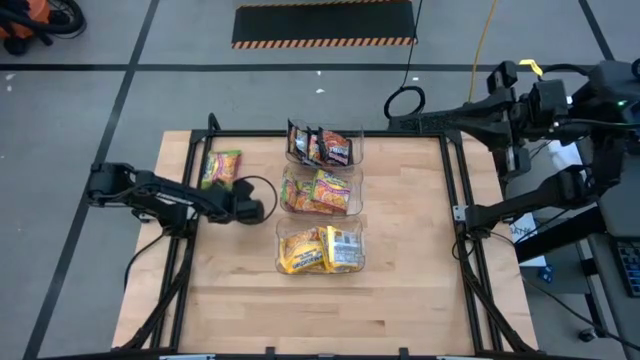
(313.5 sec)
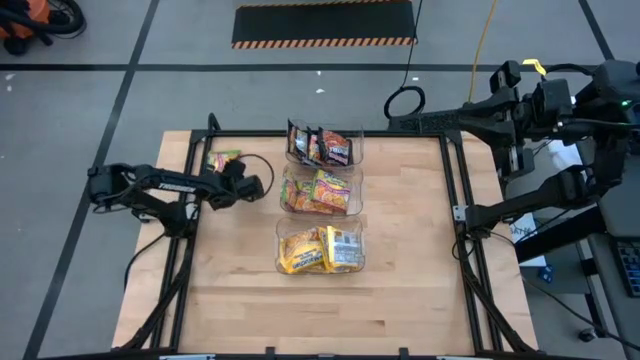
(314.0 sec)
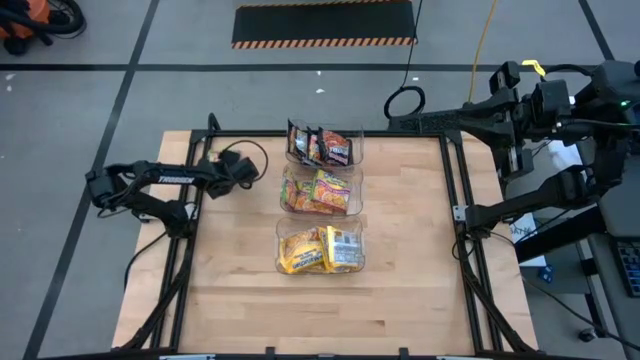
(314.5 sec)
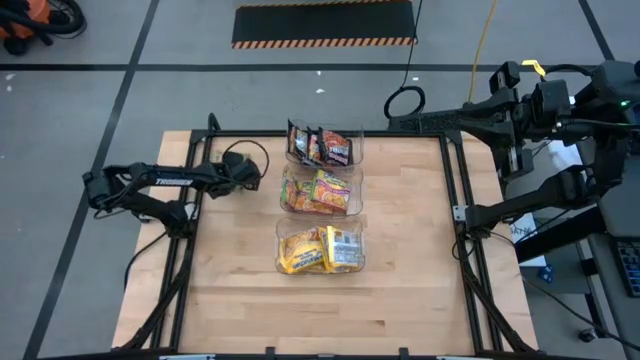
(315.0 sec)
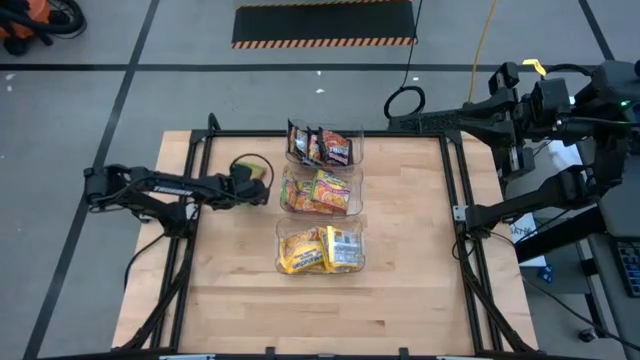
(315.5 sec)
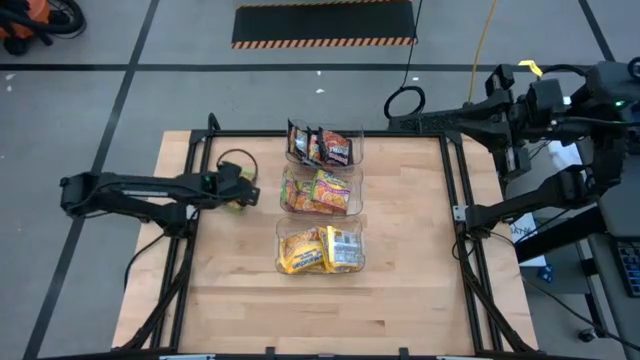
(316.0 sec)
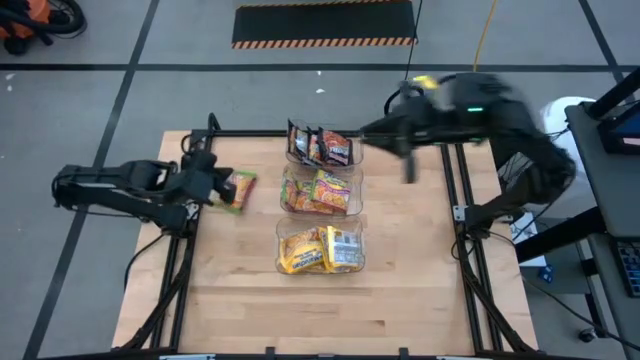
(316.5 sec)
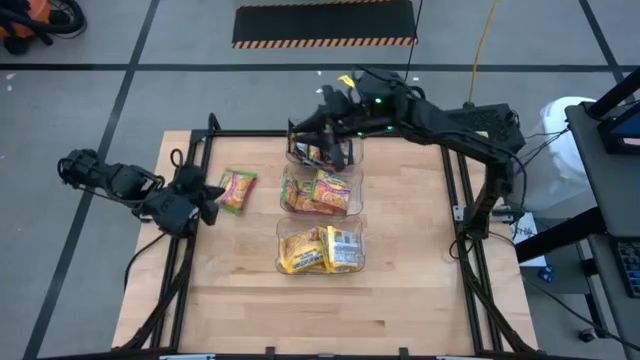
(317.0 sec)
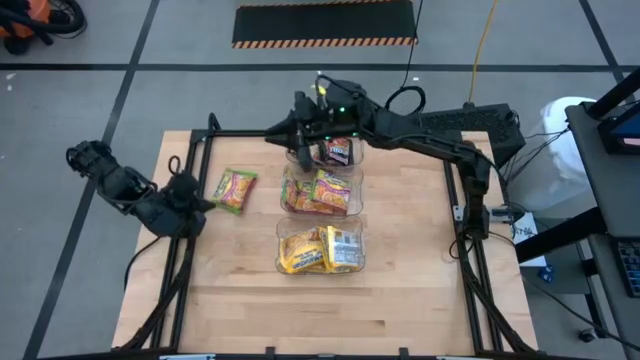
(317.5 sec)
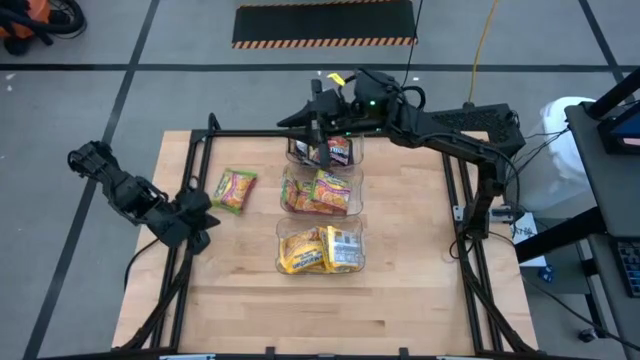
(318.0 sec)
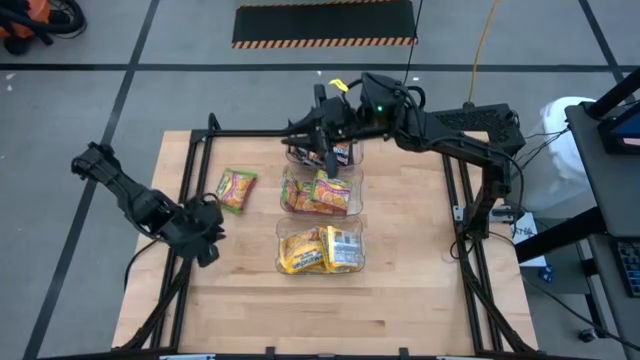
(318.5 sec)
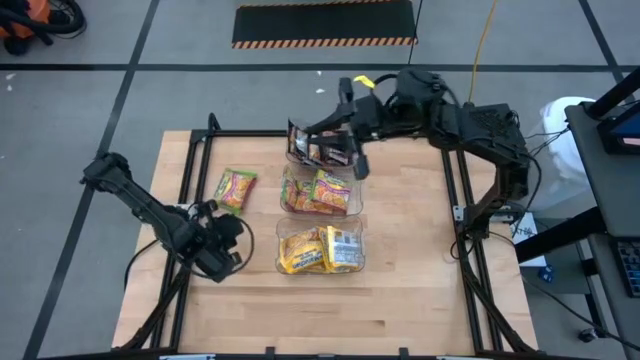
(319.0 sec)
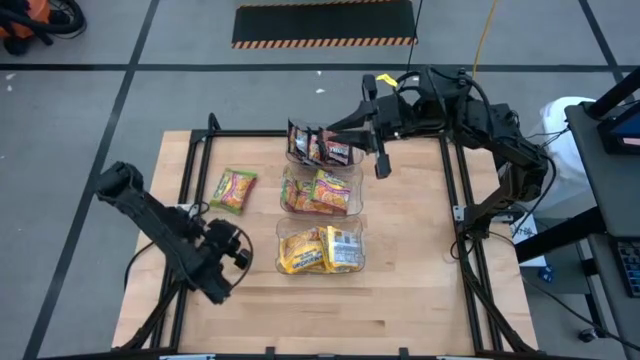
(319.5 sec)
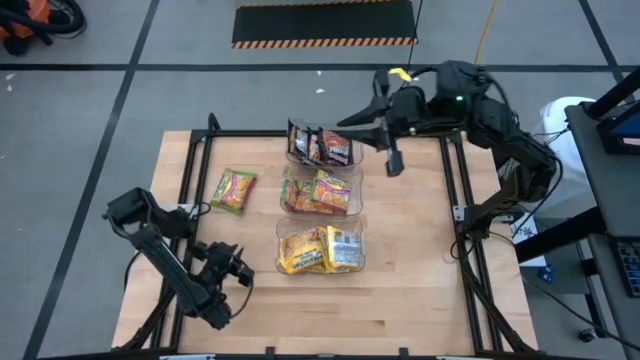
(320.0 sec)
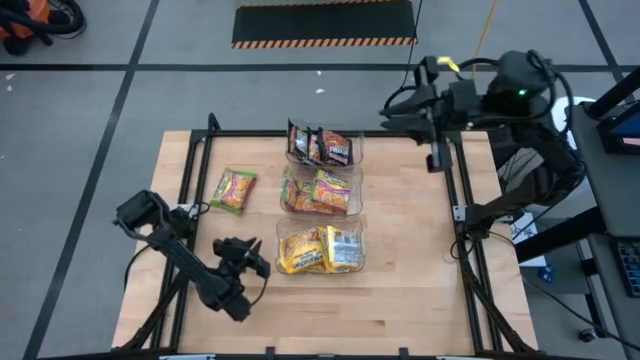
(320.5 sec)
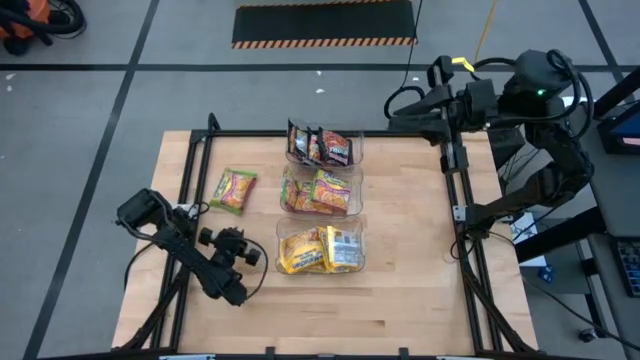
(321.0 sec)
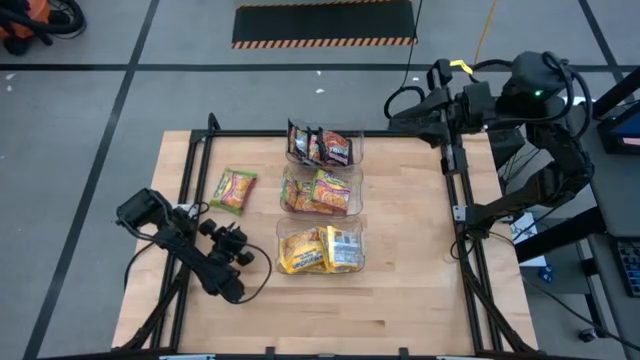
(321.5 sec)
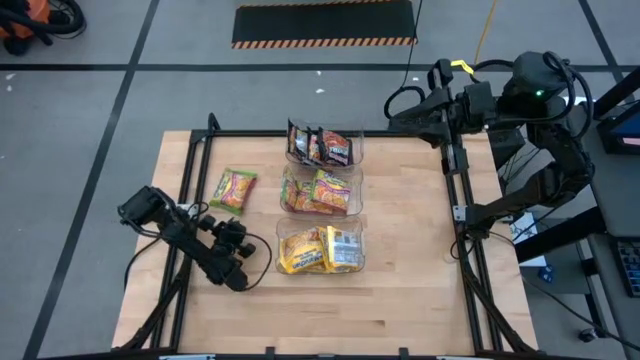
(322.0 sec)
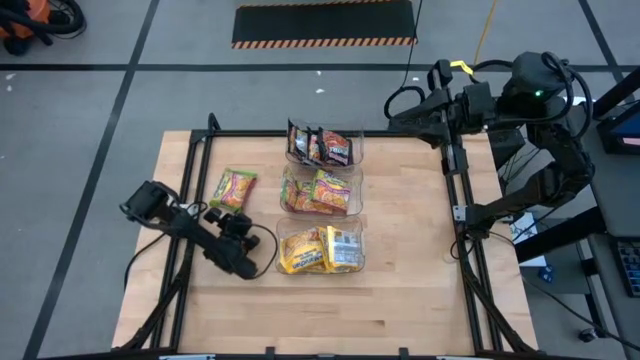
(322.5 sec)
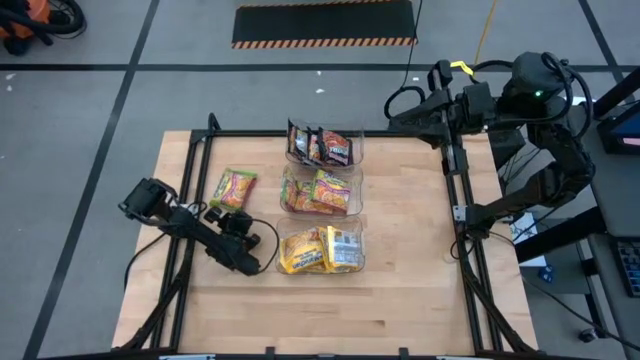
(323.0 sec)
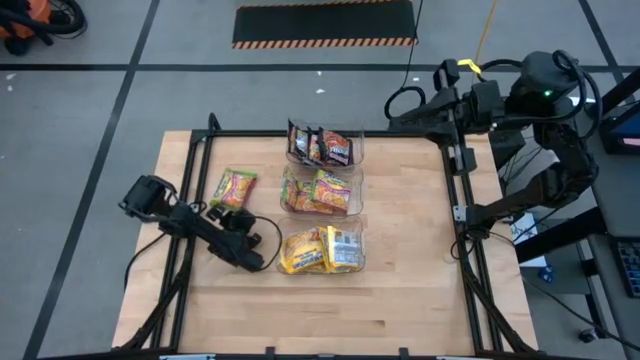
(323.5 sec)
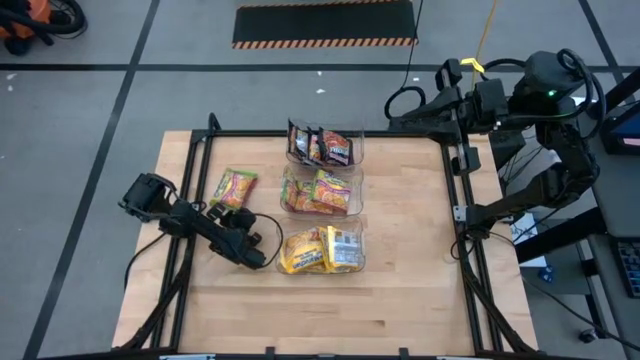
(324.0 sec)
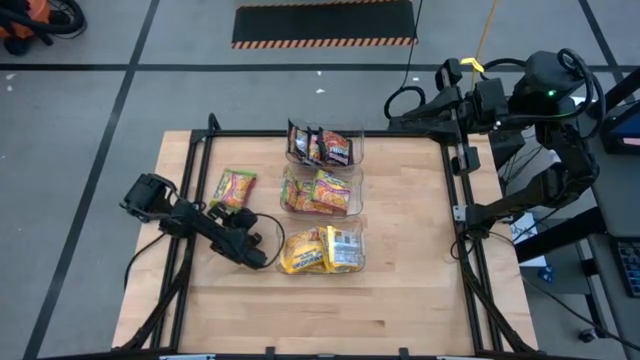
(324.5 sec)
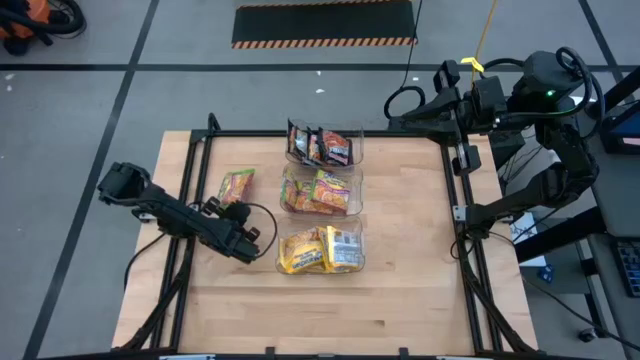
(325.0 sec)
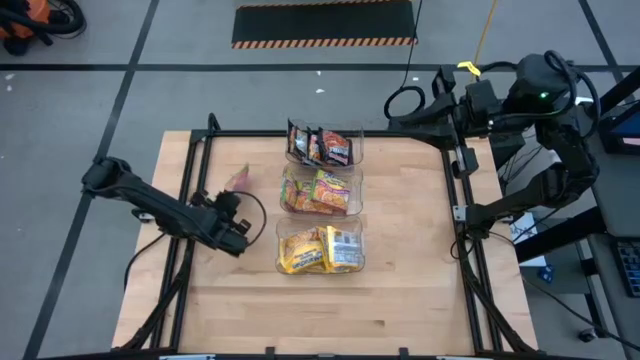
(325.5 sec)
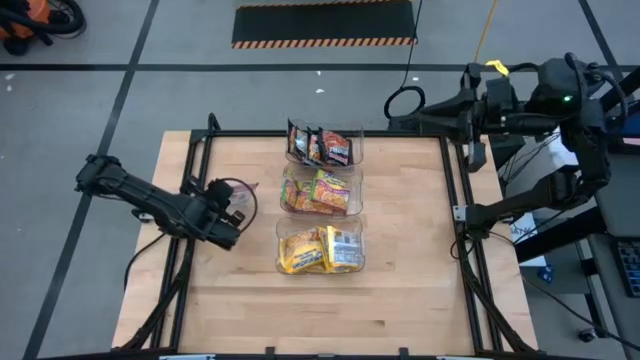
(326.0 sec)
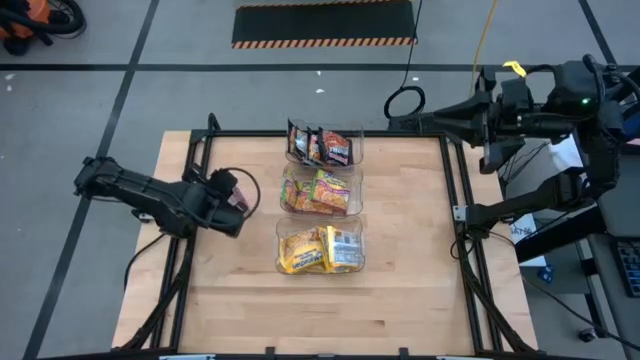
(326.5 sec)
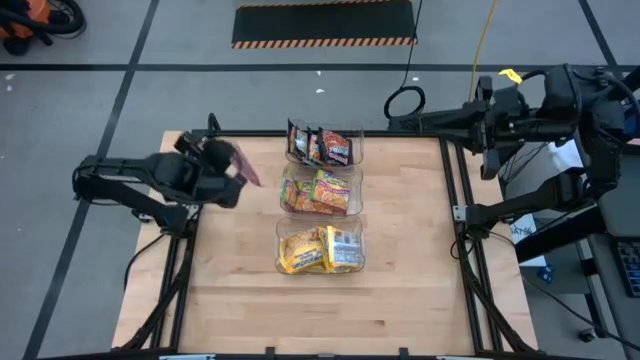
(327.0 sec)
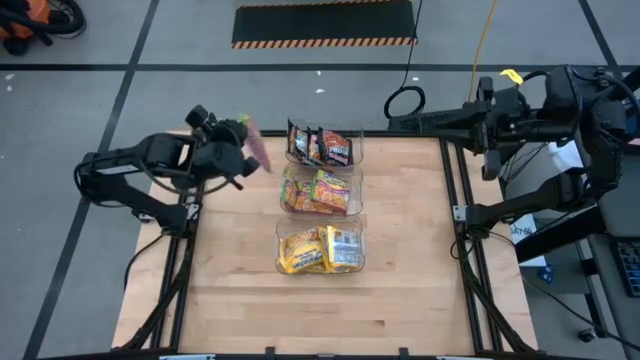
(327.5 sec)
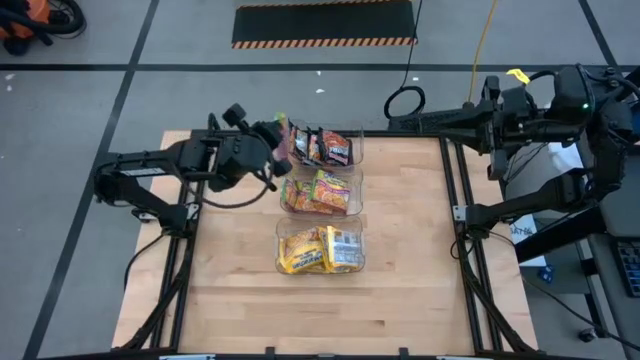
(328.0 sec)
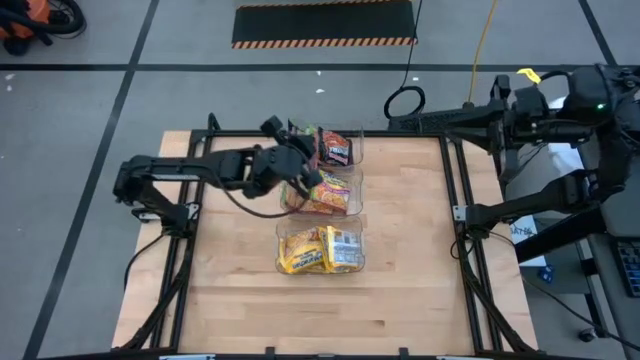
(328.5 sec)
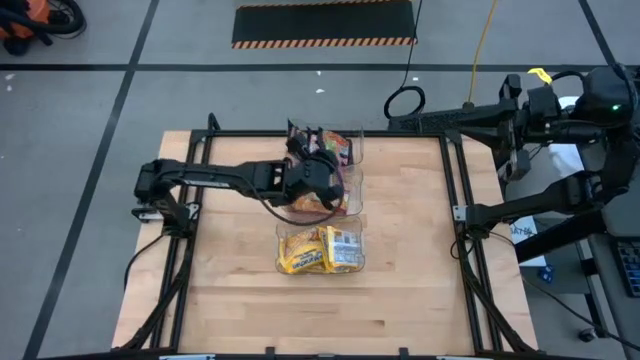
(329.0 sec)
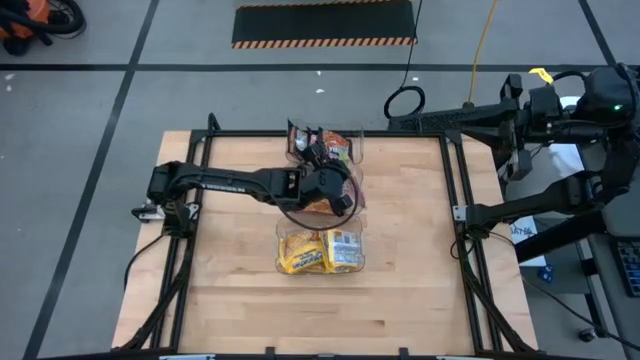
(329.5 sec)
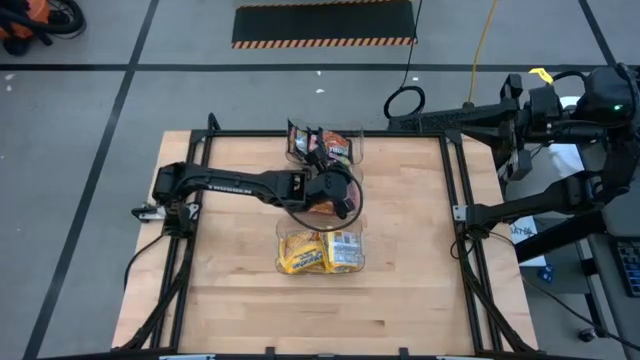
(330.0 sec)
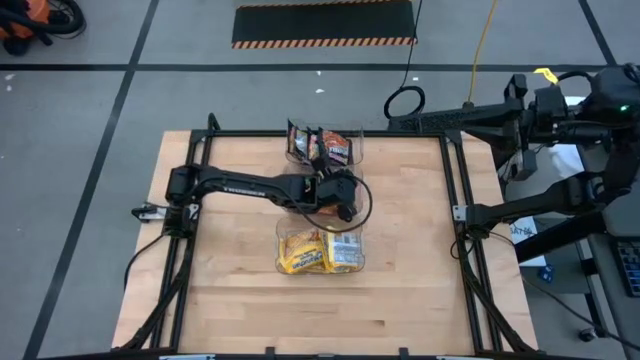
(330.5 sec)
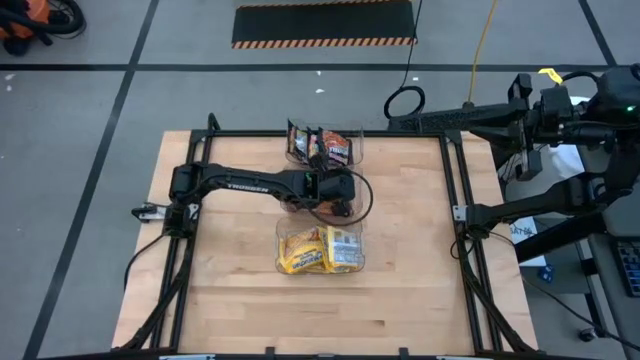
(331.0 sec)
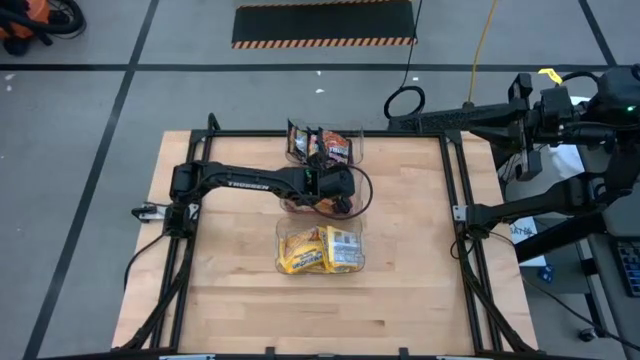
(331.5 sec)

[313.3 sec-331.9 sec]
Task: Sort Maruchan noodles
Put the green noodle pack into the center transparent bin

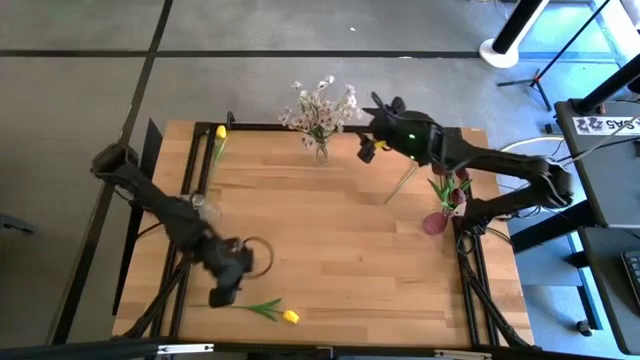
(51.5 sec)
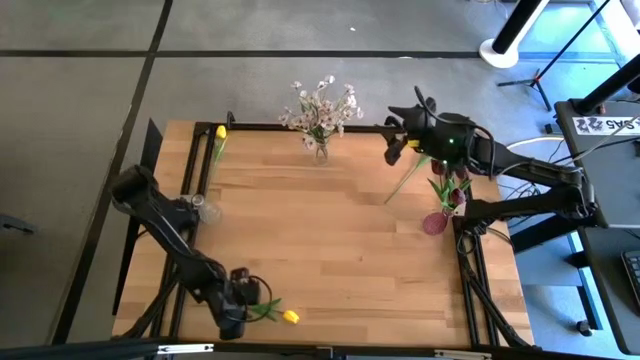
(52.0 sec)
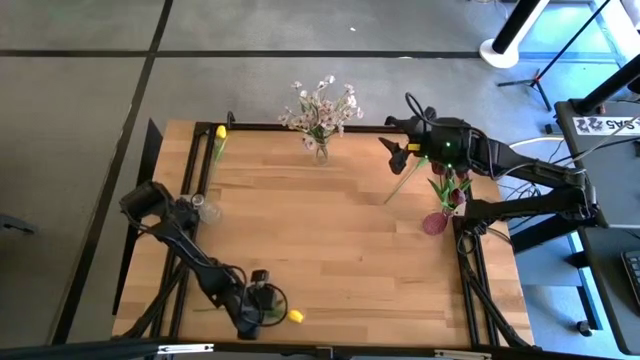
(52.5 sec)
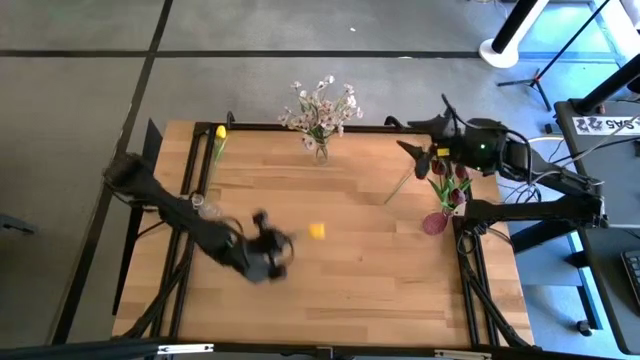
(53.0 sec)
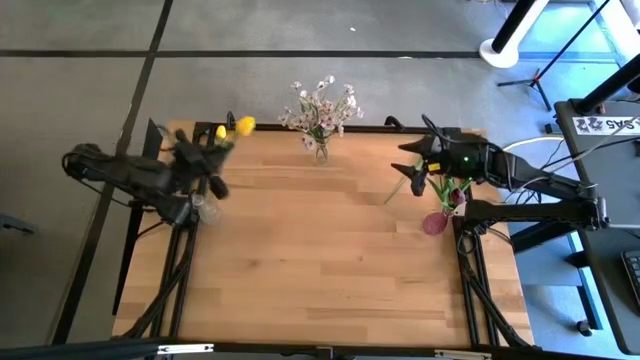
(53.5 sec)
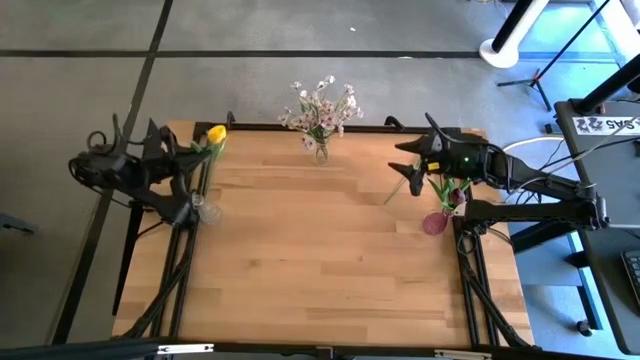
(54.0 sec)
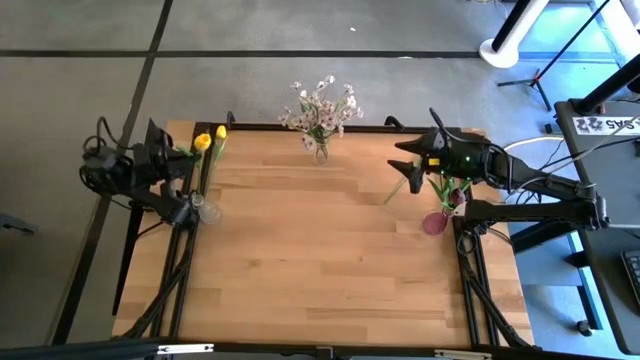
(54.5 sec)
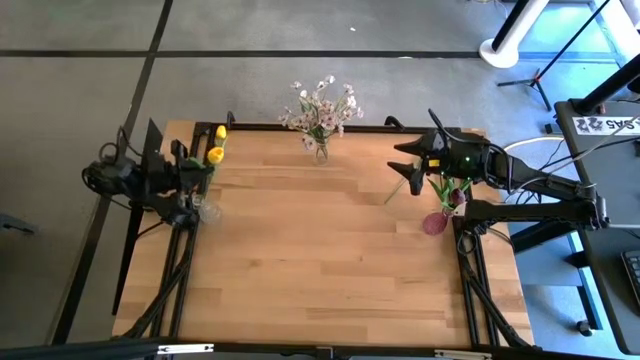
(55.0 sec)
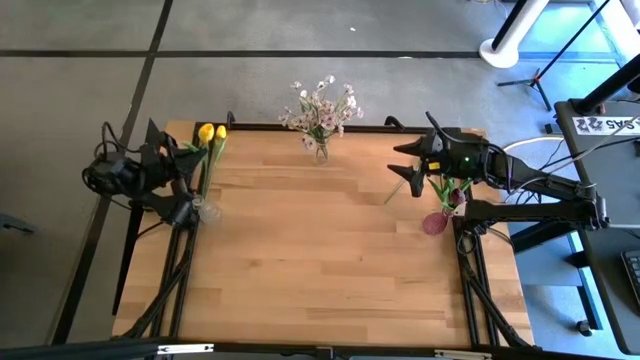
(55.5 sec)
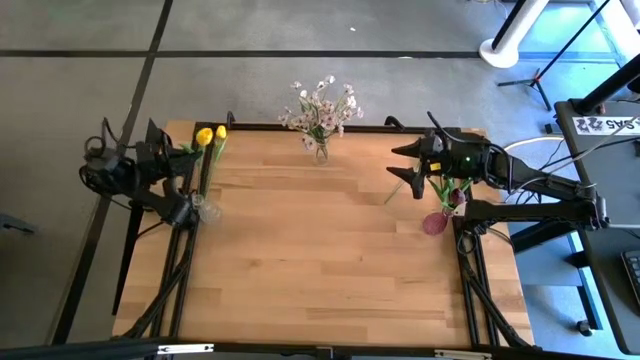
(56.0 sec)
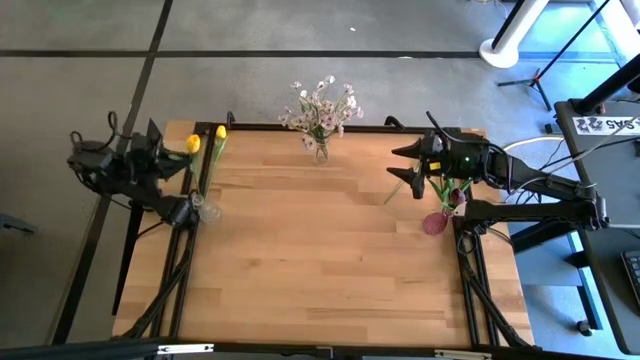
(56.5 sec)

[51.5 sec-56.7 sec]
Task: Sort flowers into vase by color
Put the bottom yellow flower into the bottom transparent vase
